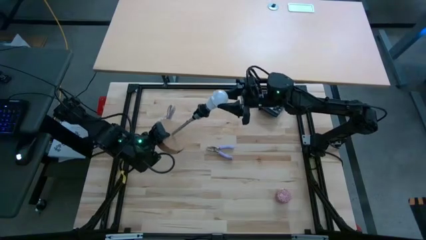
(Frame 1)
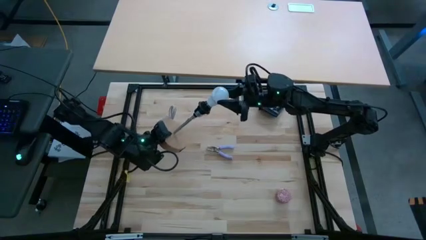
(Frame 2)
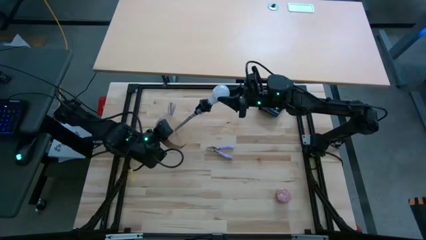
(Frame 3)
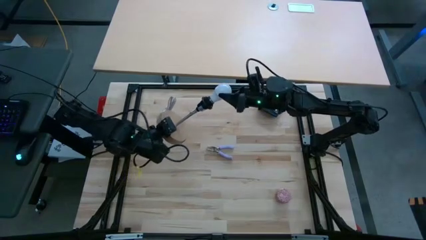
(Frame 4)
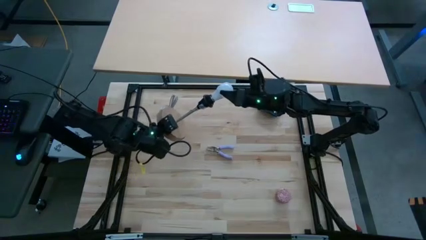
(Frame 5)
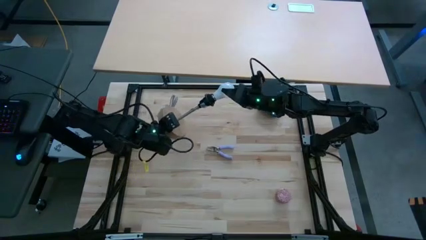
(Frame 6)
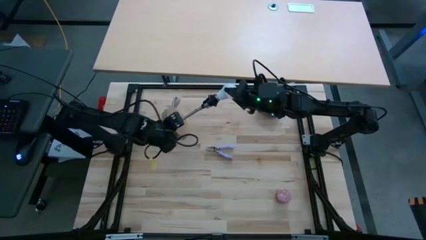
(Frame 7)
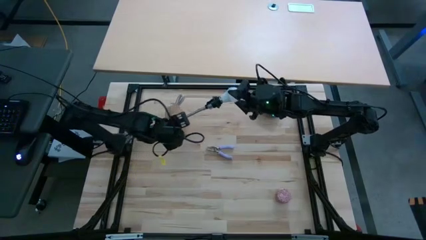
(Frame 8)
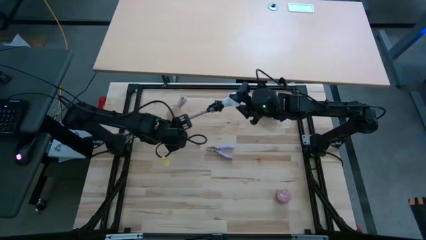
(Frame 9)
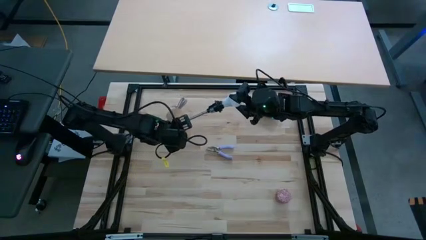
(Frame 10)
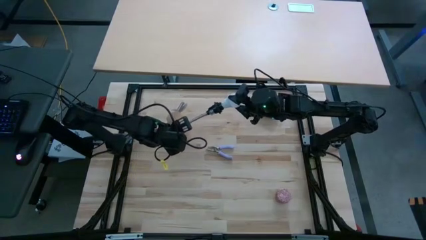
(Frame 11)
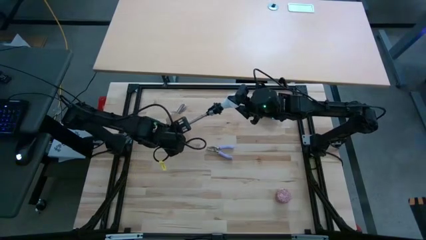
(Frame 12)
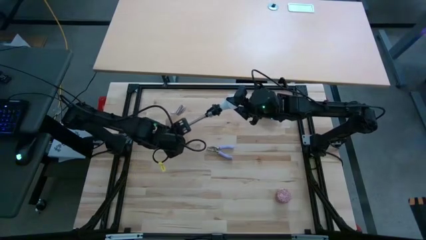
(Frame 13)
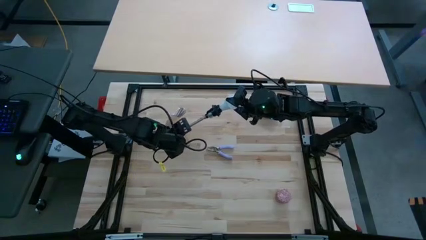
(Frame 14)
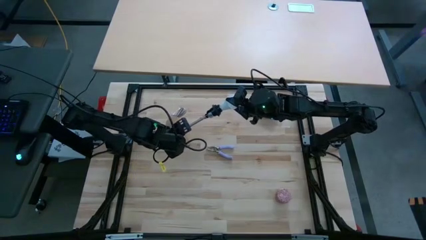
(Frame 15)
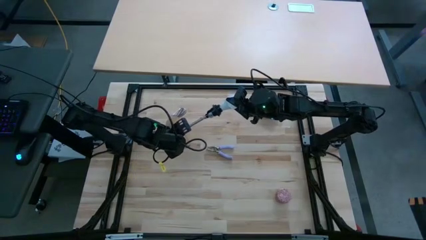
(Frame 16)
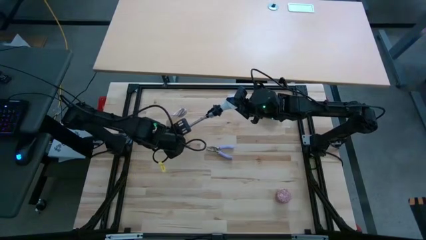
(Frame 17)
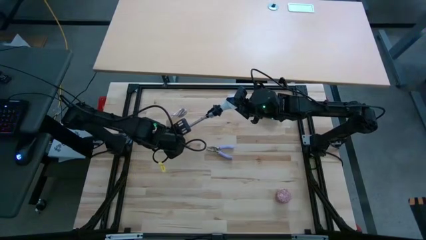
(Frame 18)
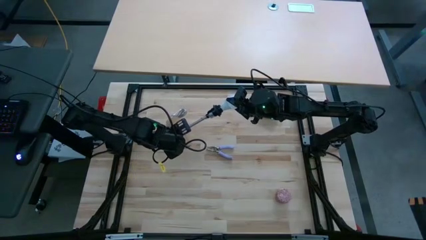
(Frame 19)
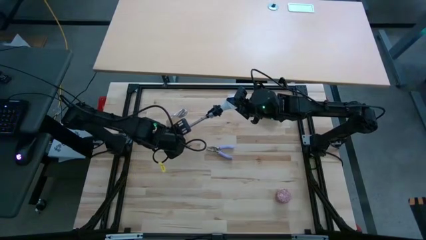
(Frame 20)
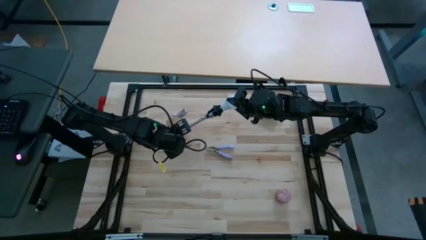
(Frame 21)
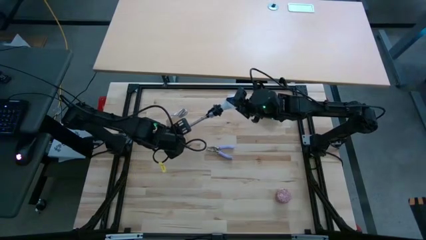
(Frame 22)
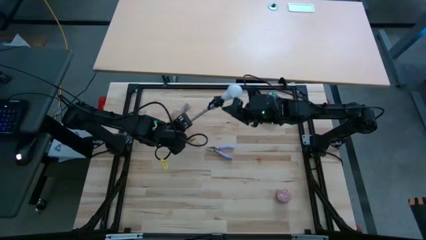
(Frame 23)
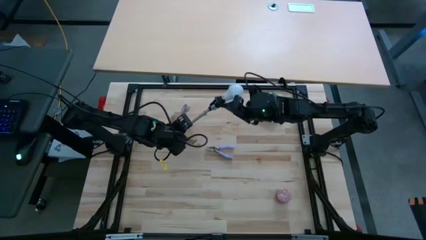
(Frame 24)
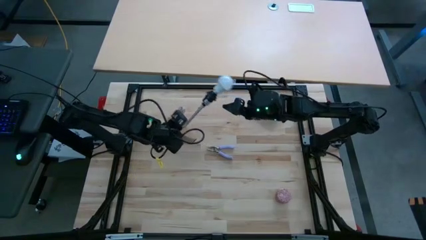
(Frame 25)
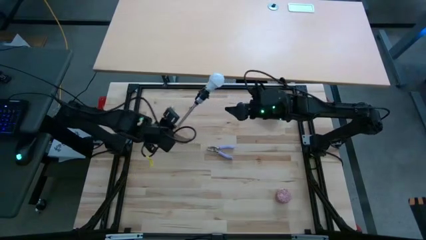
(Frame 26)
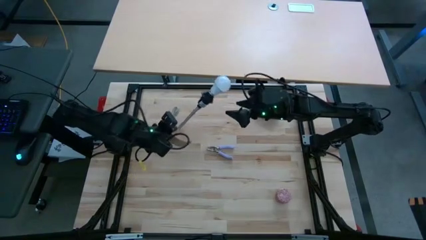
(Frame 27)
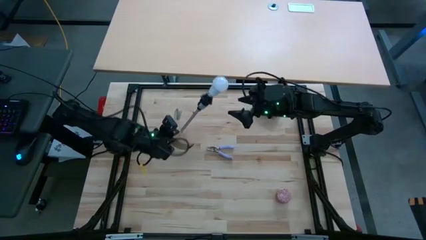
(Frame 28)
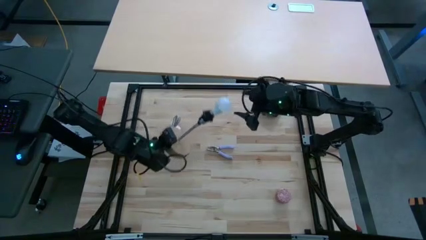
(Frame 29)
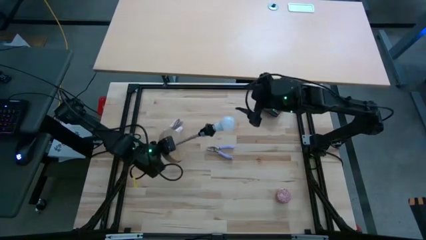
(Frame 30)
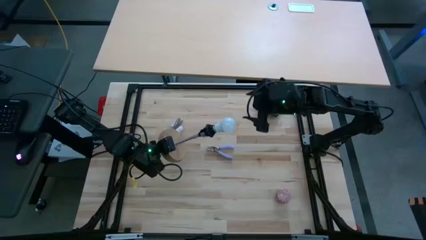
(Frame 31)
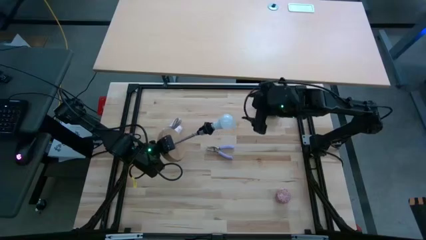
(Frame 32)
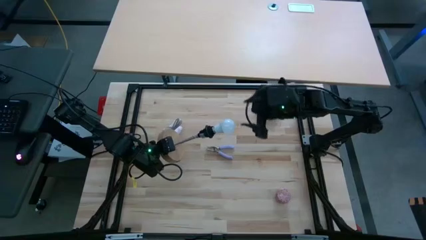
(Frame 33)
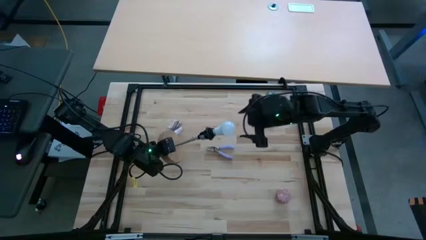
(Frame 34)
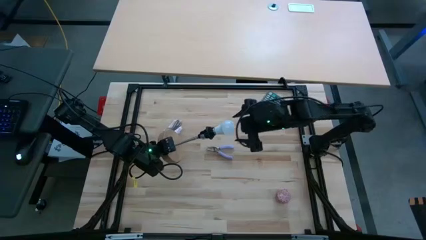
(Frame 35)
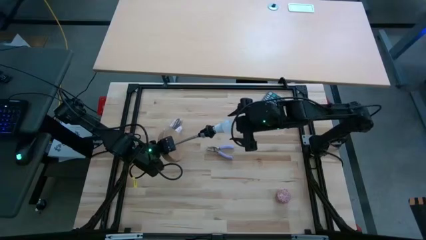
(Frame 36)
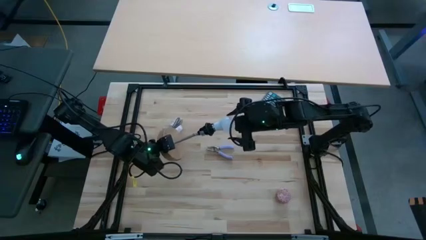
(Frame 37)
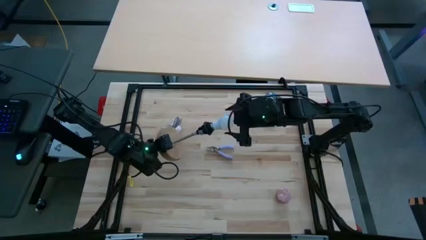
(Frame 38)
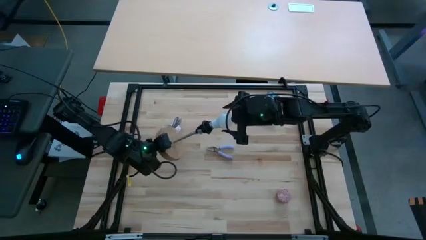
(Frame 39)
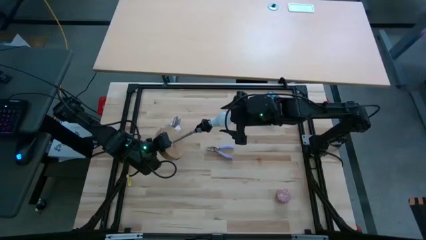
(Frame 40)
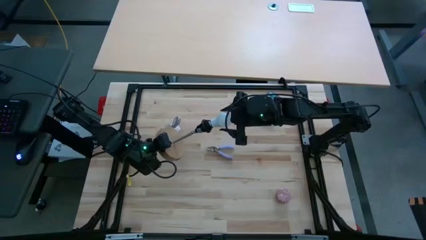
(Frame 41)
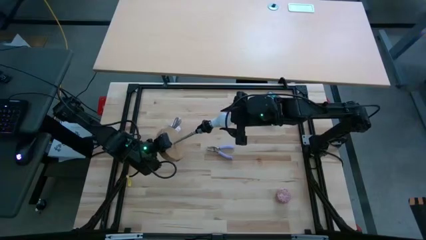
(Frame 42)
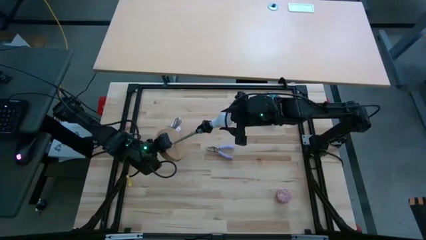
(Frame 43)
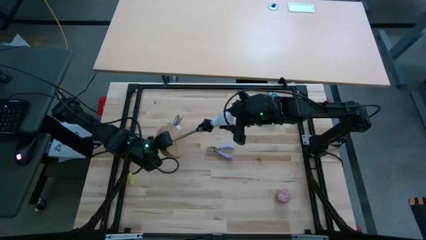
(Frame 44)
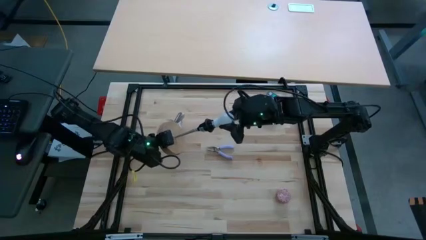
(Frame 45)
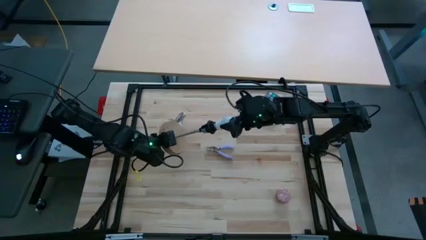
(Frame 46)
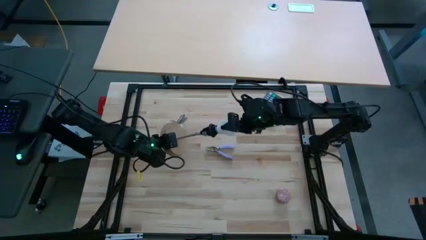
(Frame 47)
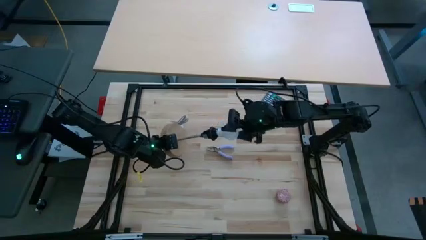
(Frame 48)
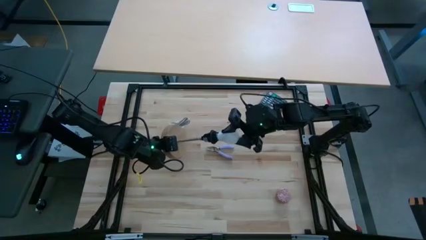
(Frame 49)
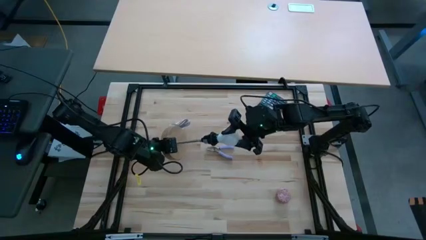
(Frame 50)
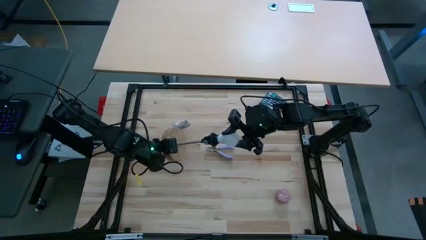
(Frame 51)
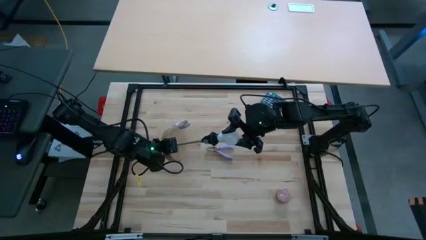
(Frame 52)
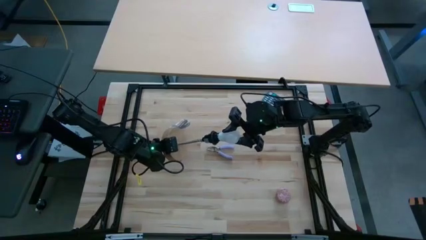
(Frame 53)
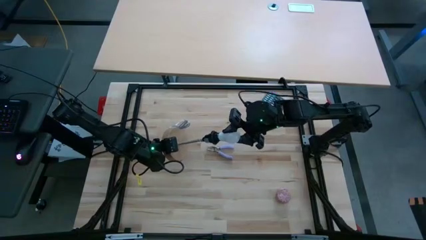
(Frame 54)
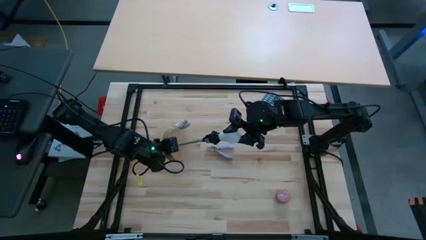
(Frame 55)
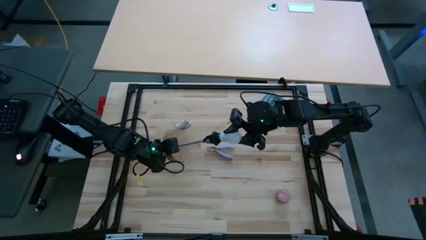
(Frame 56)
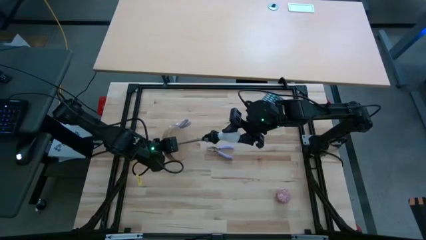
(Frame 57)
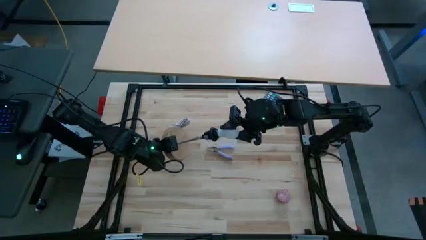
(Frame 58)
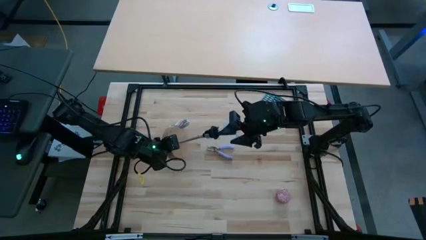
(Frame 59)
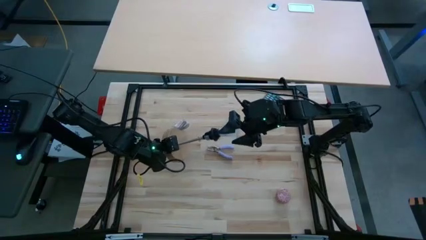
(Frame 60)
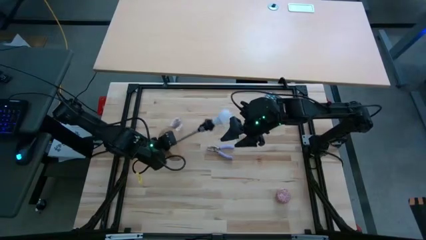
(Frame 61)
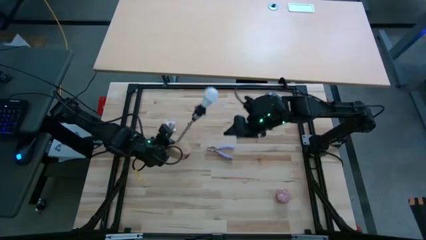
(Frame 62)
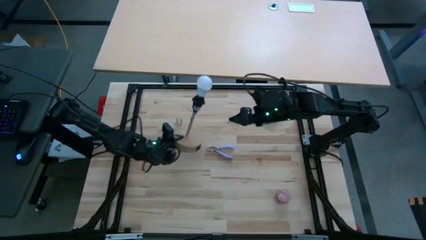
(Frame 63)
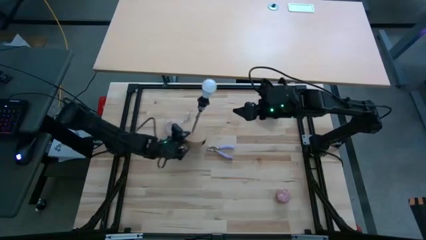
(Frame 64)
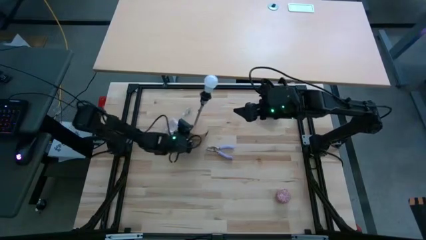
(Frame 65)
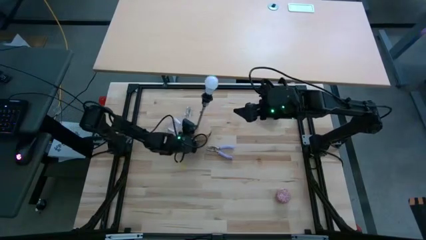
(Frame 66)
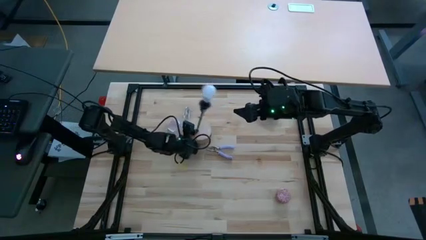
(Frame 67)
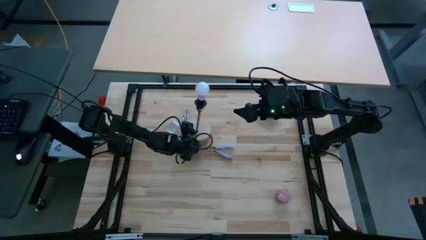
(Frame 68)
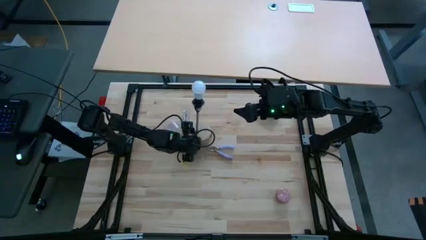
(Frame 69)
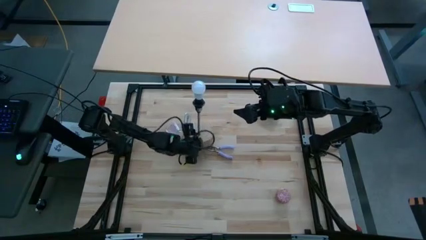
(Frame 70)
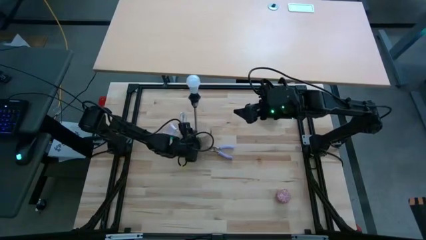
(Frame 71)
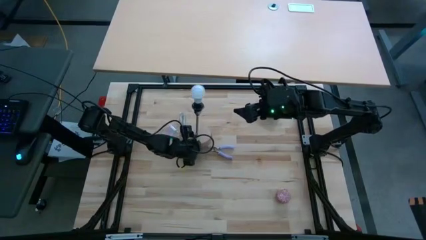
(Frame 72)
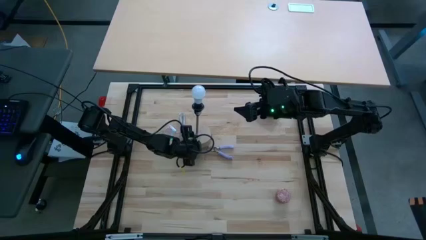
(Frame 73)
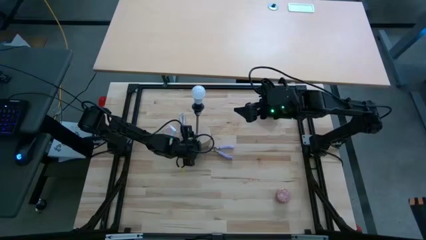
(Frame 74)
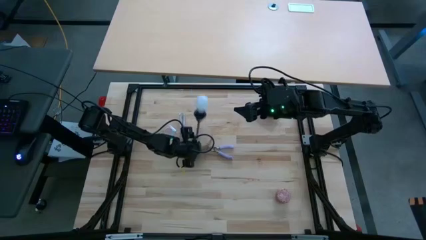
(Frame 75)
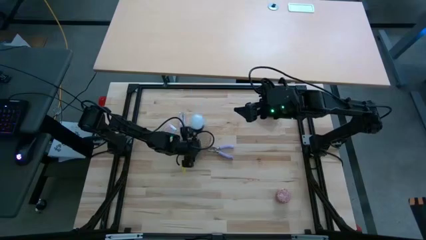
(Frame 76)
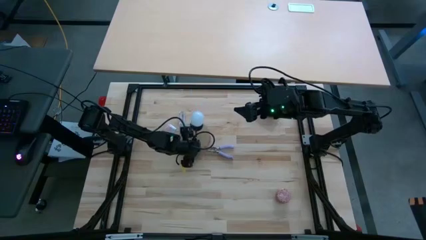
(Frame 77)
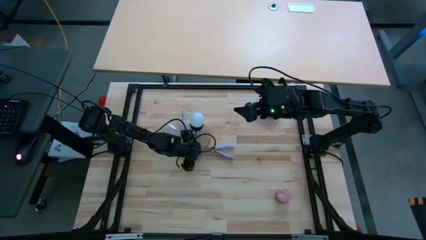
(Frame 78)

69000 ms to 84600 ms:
Task: Screw lightbulb
Insert the light bulb into the lamp socket
